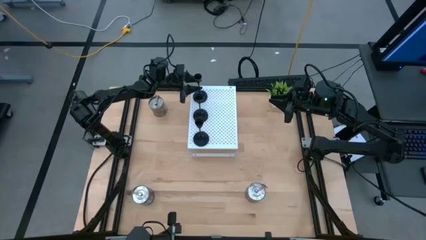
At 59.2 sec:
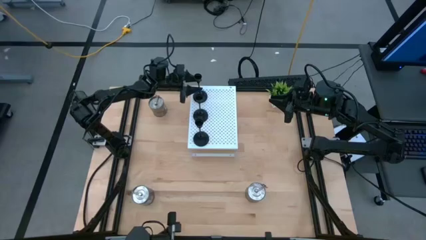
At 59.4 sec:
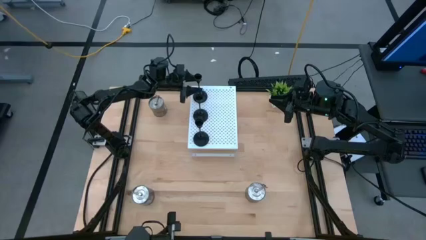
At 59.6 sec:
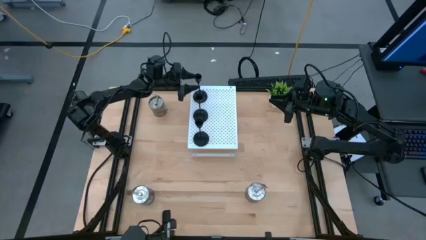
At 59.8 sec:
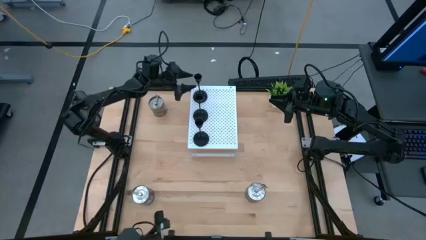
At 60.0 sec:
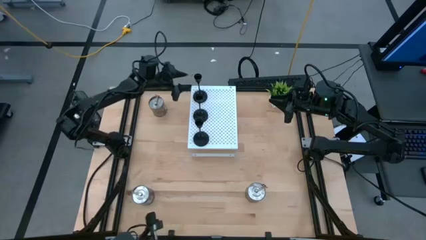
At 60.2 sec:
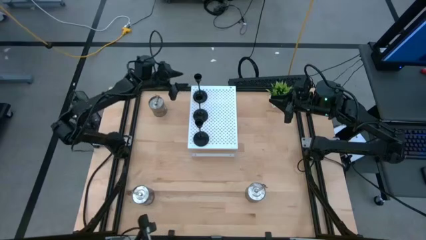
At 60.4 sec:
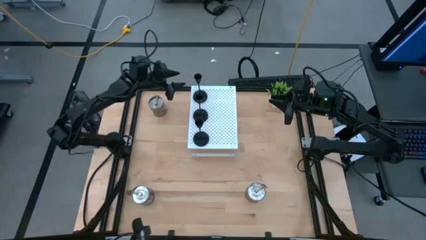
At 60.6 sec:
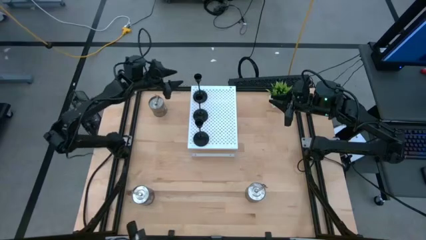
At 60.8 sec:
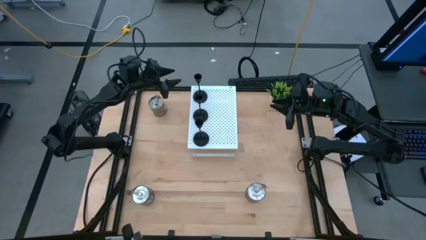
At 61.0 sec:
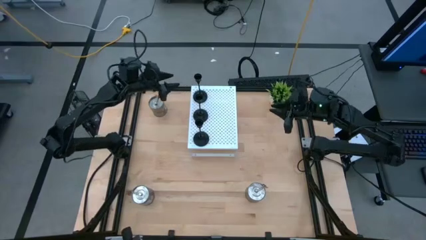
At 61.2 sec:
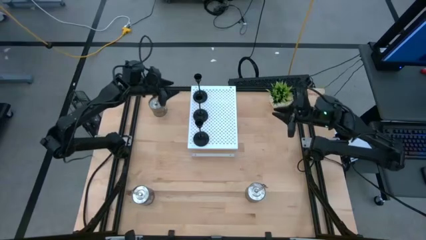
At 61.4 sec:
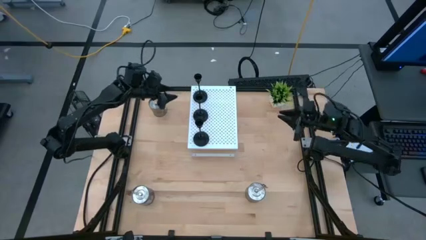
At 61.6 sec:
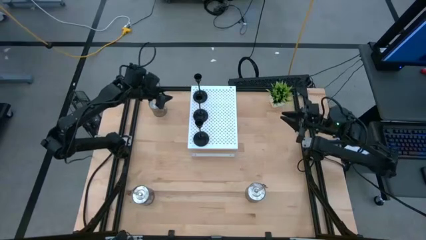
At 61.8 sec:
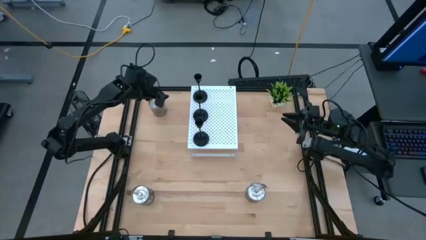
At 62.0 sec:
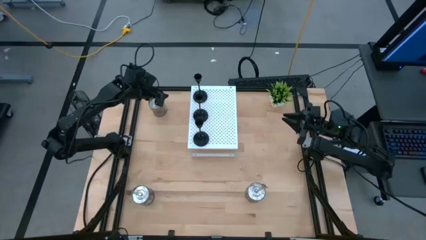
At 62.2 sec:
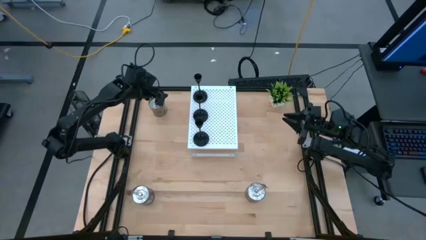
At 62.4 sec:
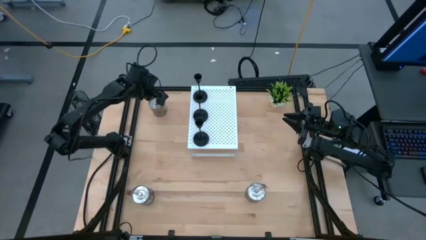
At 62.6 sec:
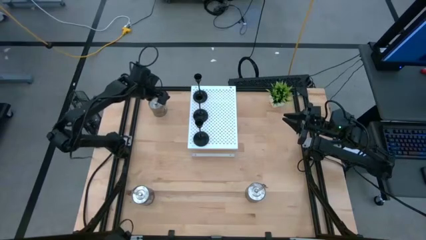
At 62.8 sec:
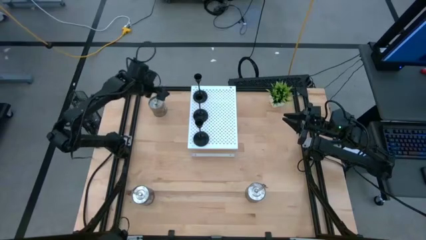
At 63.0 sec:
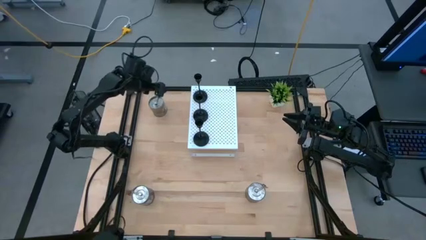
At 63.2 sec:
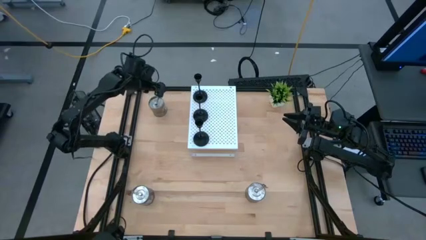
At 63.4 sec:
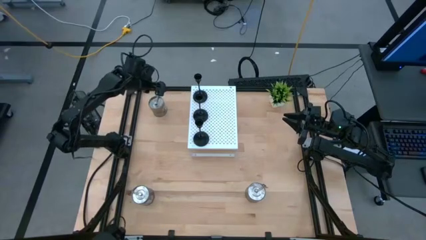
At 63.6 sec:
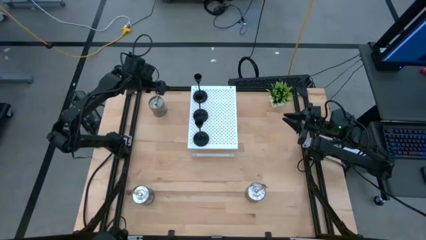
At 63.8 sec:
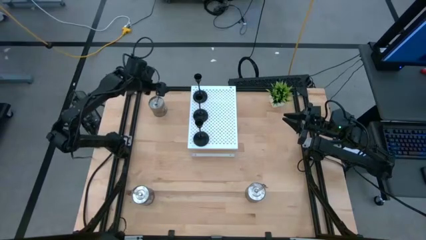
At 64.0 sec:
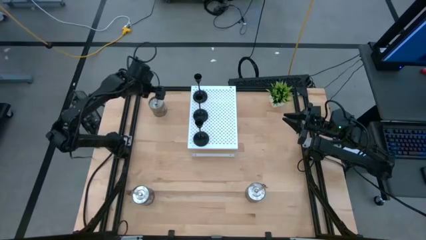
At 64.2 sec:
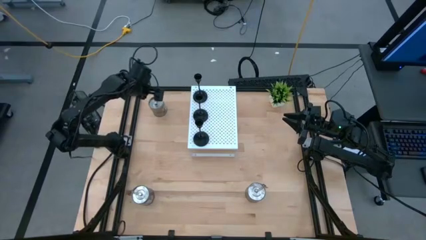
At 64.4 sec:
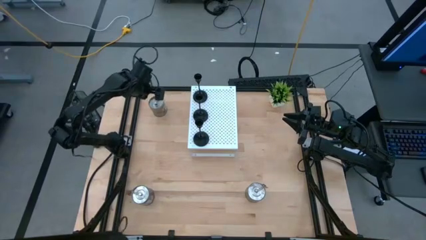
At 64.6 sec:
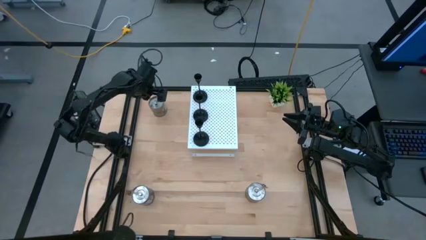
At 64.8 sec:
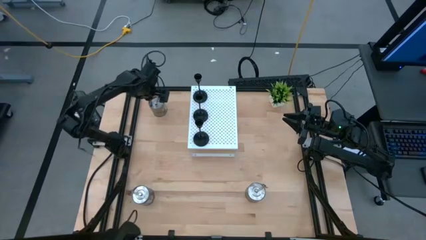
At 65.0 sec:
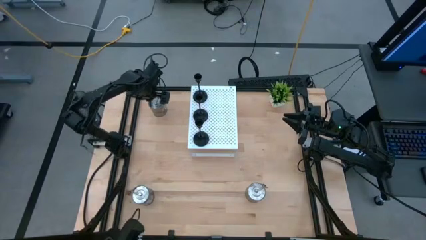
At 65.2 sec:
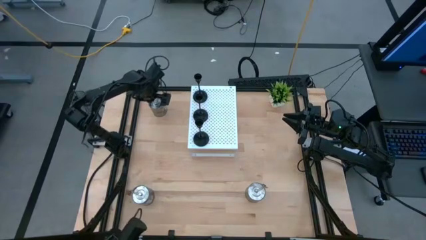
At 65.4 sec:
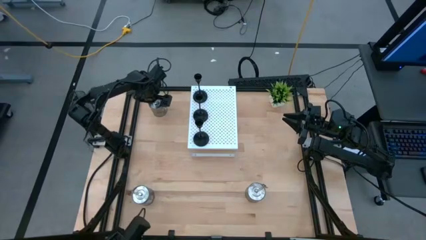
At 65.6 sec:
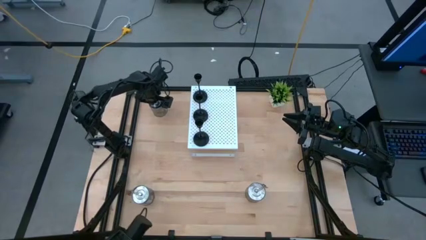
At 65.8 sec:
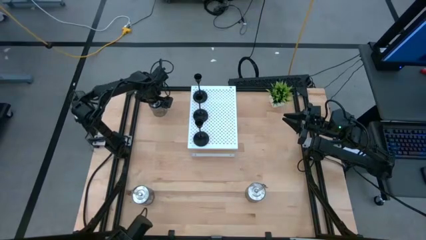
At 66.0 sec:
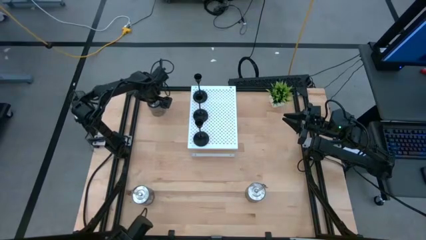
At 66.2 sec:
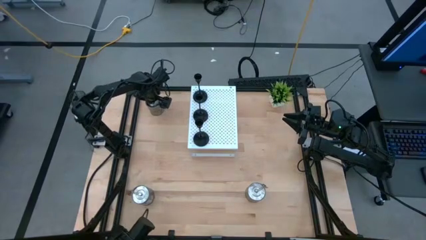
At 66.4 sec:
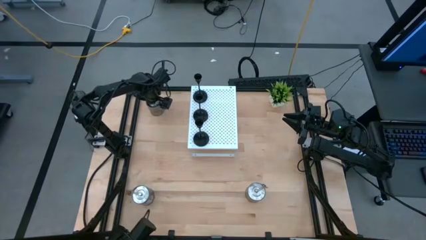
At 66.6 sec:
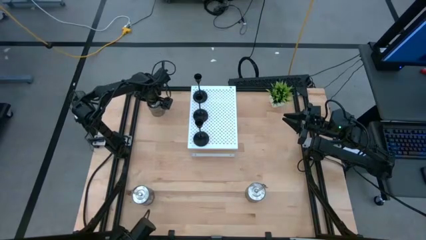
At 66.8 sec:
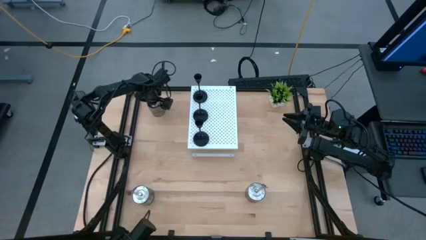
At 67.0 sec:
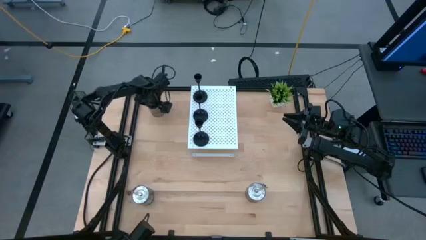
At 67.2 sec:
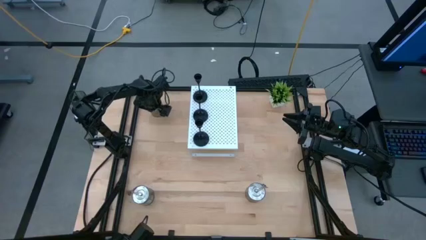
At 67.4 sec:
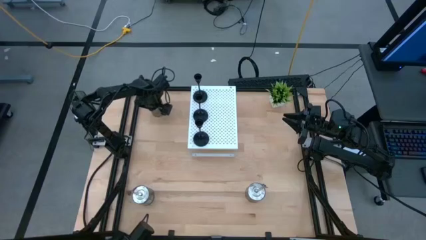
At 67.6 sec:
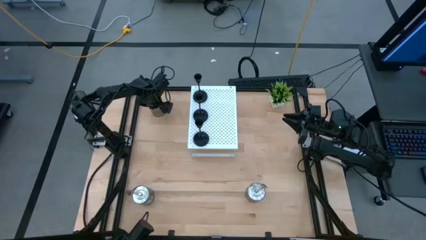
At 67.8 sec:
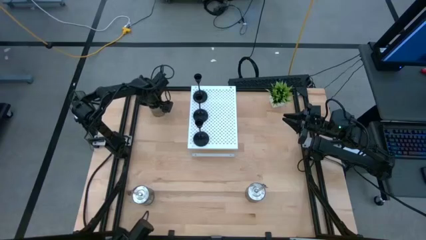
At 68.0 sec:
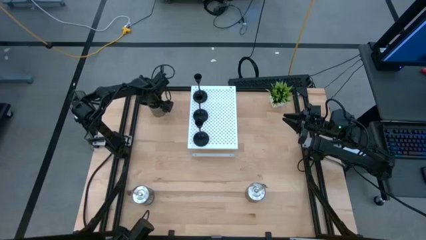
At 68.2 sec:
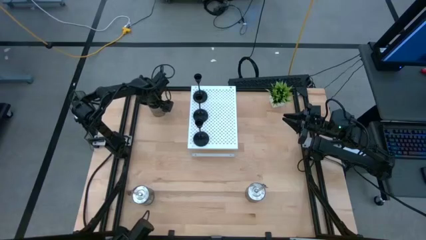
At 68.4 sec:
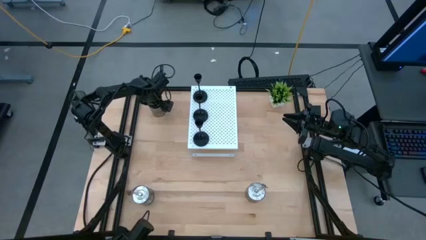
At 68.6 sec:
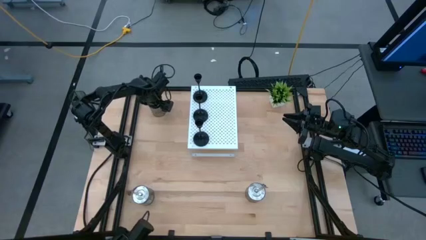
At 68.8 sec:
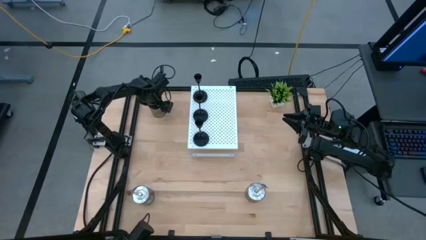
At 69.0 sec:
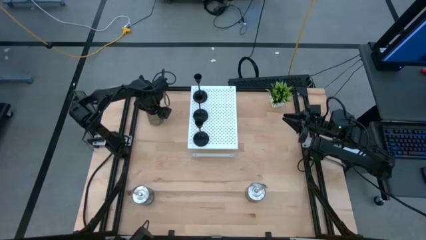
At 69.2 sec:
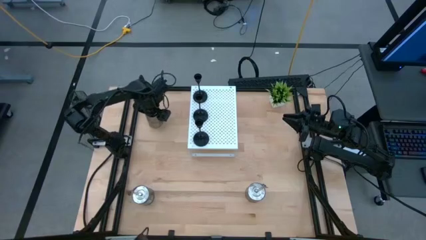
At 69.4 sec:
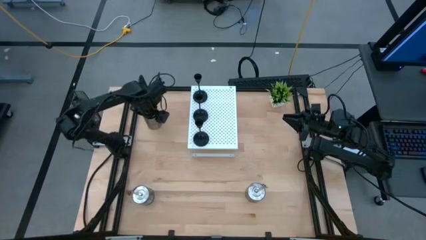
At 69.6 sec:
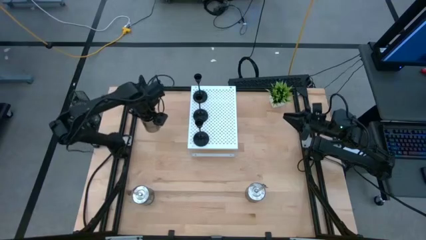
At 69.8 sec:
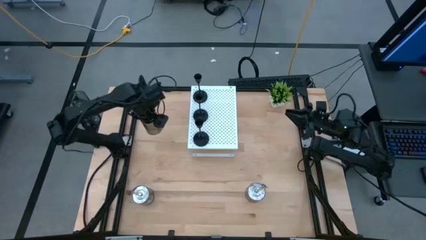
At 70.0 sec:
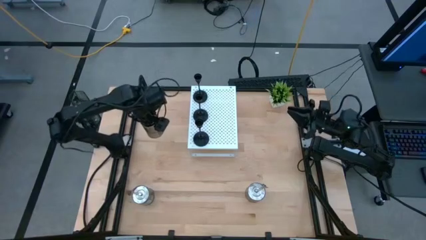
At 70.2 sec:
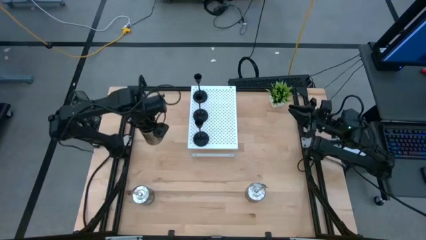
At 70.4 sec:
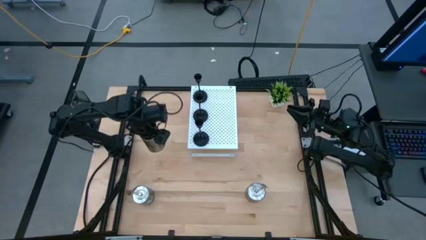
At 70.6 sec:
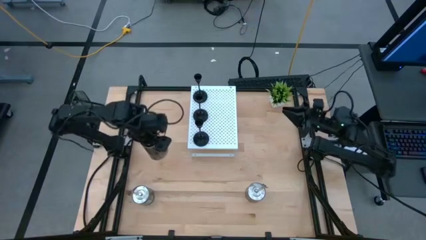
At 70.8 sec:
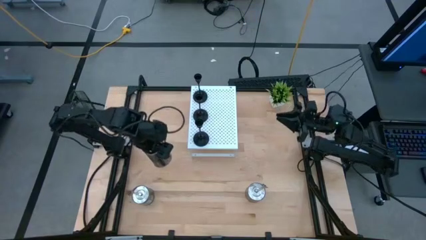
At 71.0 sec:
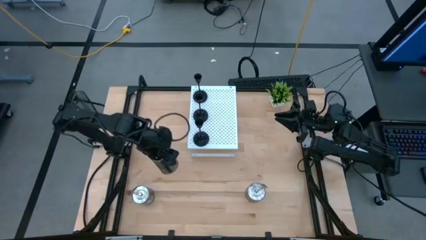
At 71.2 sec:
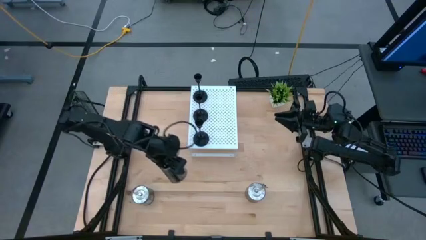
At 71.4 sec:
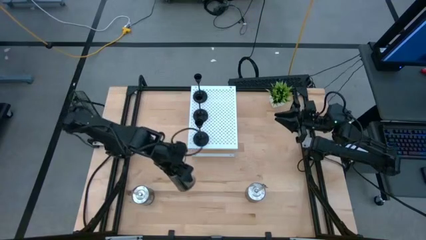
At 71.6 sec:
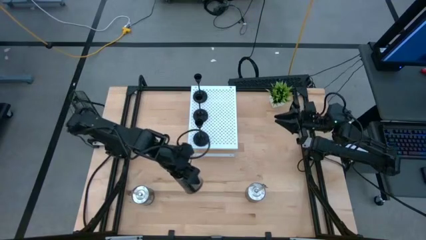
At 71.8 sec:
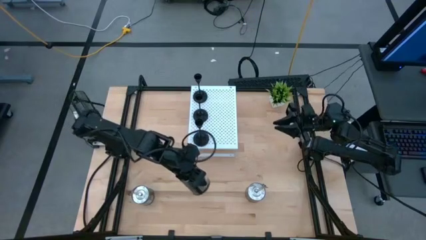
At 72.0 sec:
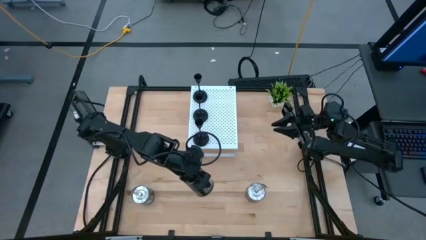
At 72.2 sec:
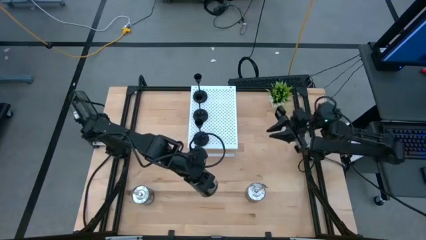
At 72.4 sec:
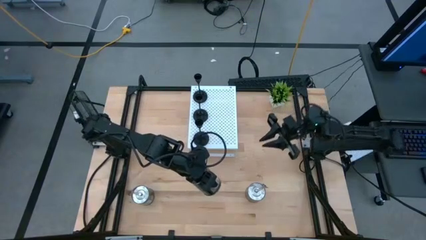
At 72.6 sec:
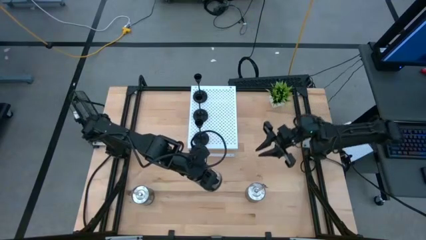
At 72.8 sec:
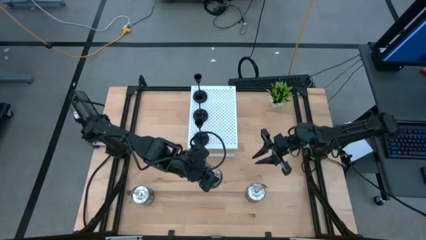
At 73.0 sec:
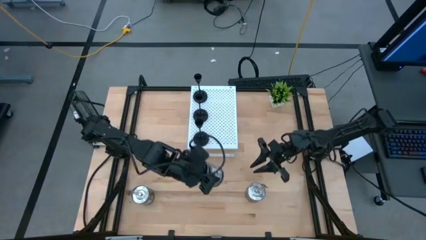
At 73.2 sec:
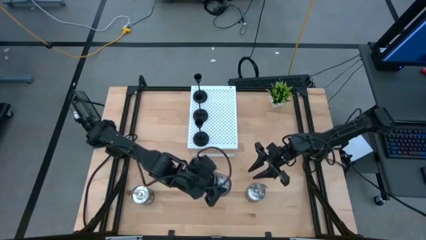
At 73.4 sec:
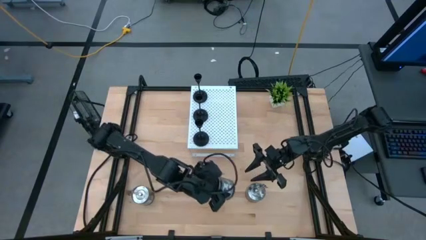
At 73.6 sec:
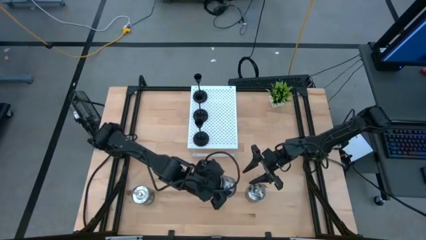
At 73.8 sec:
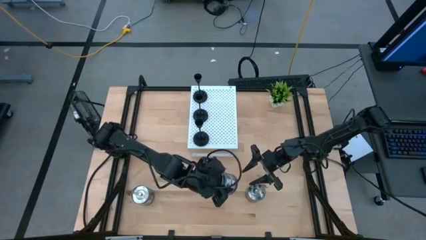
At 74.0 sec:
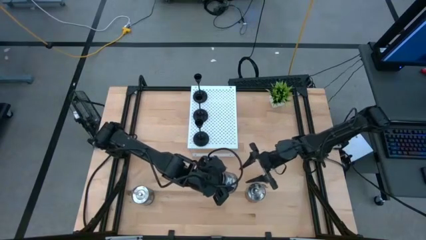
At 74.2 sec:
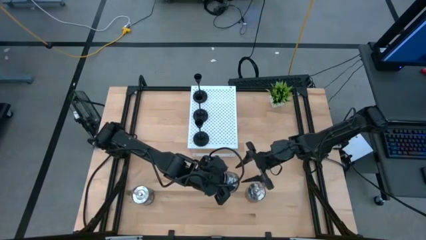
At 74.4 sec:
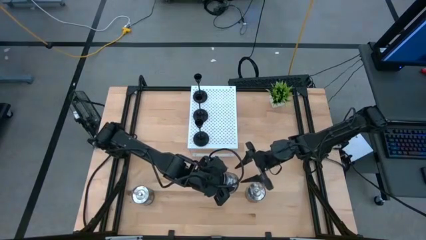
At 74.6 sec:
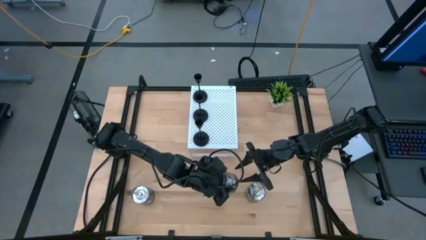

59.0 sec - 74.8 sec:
Task: Pick & Place candle stick holders
Put the top silver scented candle on the shelf
